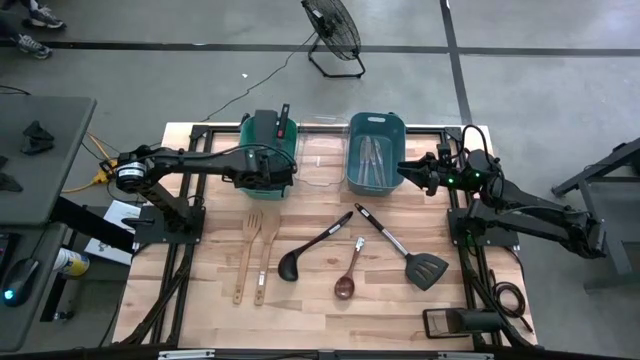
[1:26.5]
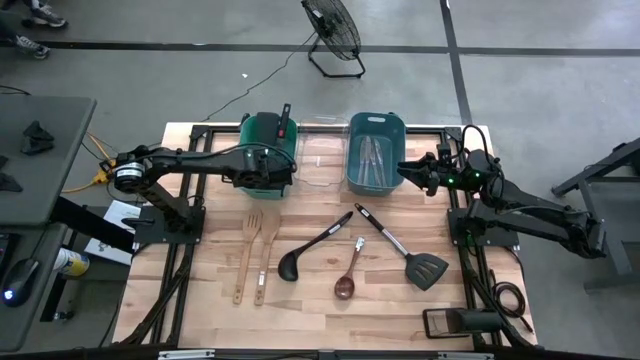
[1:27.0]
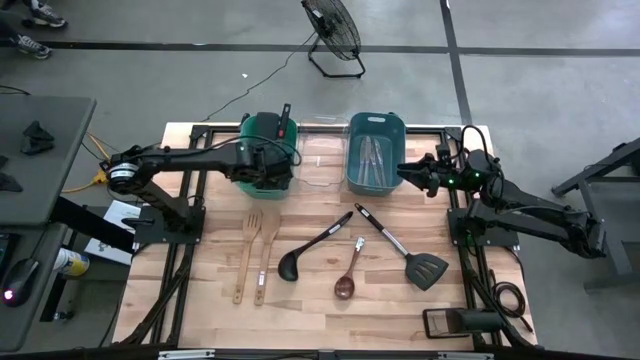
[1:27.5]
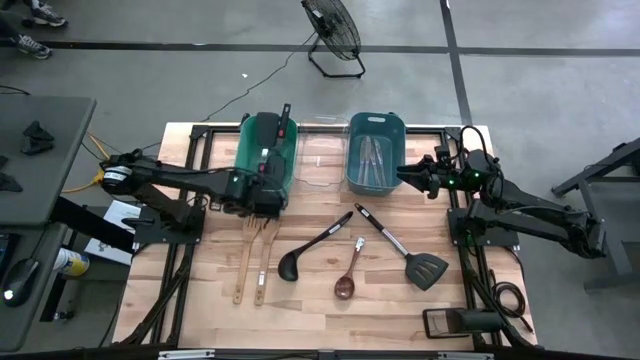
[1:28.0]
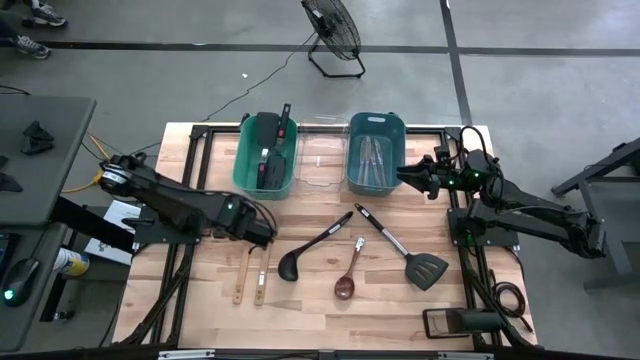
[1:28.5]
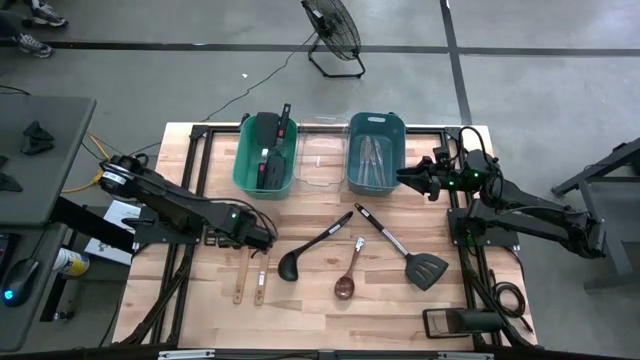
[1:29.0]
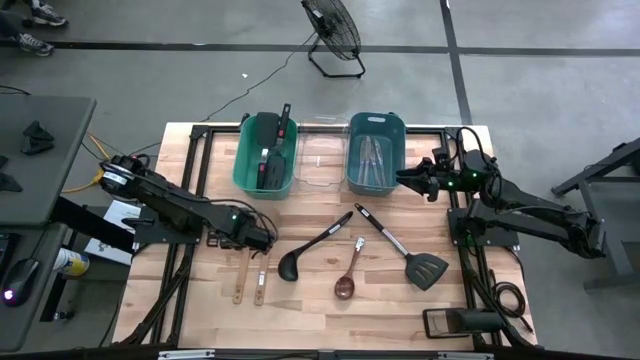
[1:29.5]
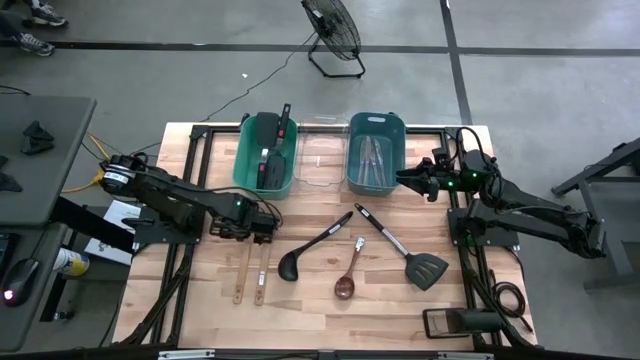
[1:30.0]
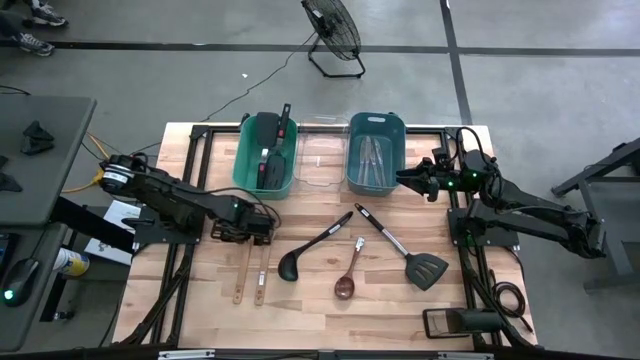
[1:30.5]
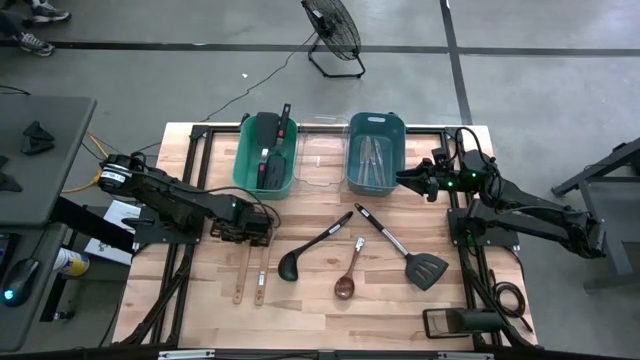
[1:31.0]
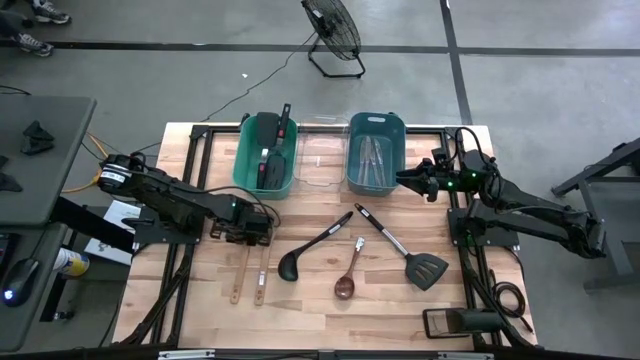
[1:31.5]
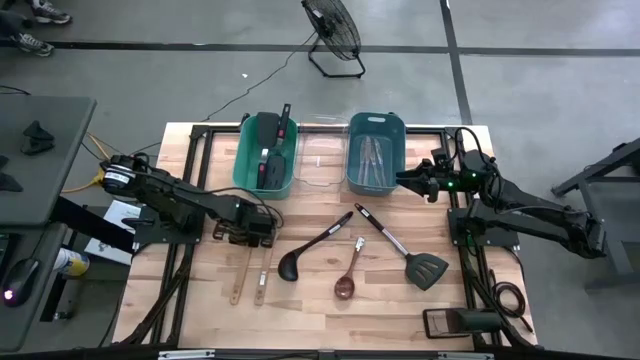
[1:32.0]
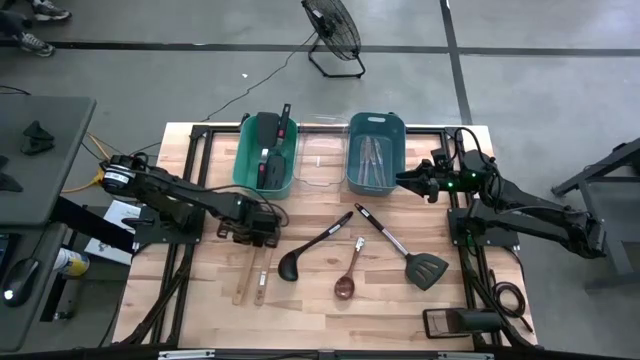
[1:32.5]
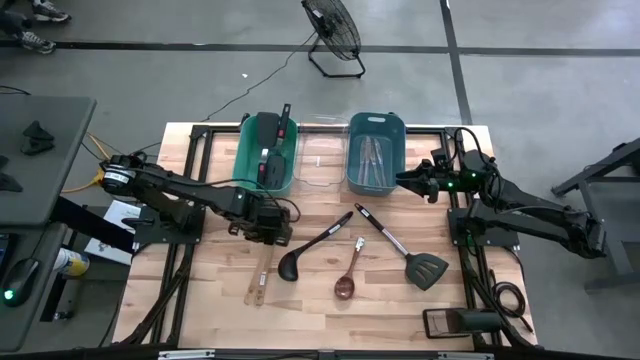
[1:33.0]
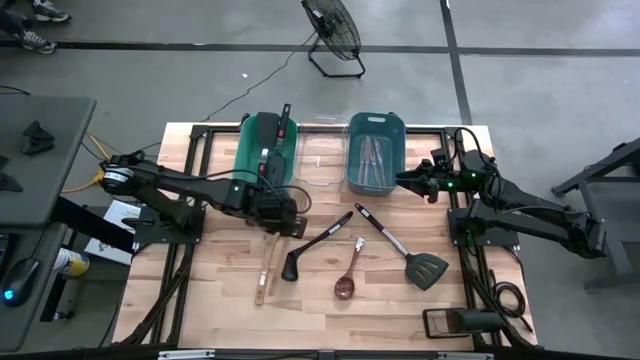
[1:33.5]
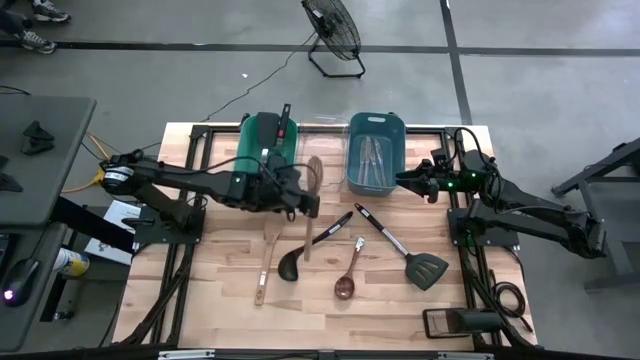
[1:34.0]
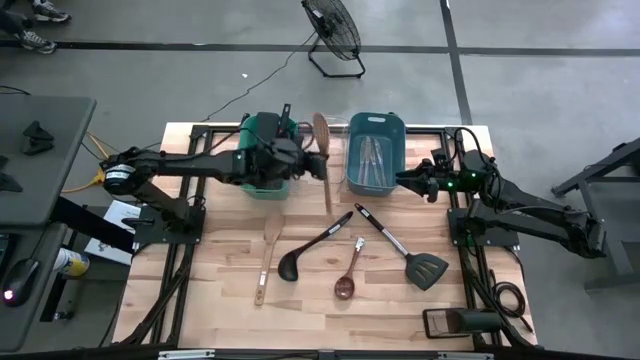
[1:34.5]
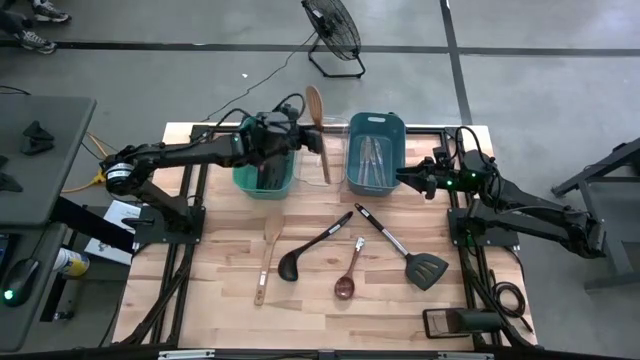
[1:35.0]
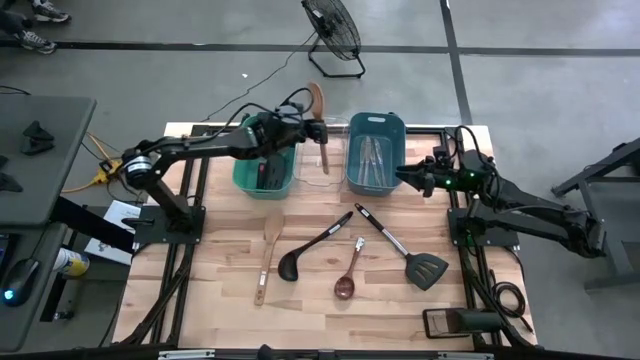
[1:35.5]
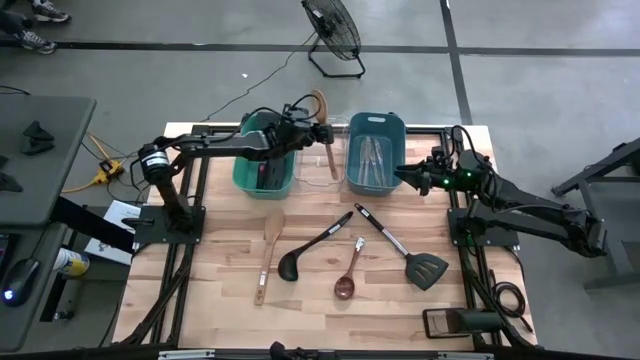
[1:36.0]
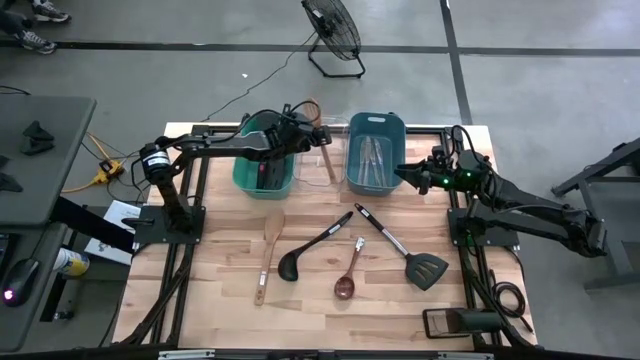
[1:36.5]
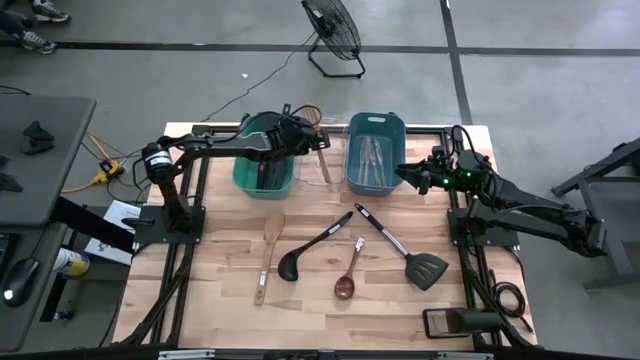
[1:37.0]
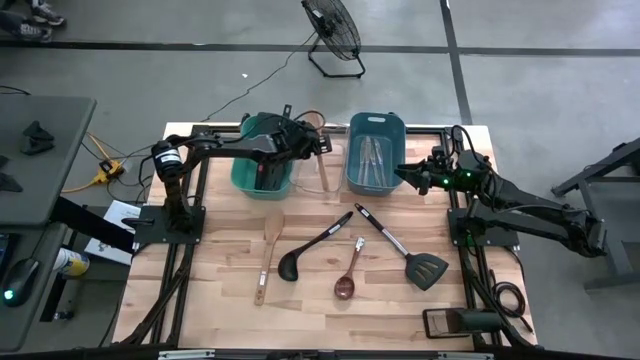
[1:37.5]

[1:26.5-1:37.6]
Task: Pick & Place Kitchen Items
Put the light brown slotted serving spoon into the transparent bin

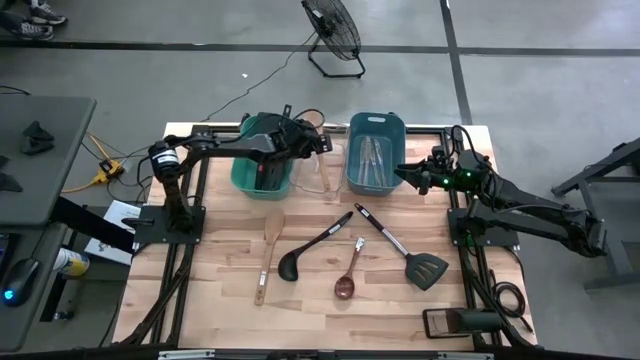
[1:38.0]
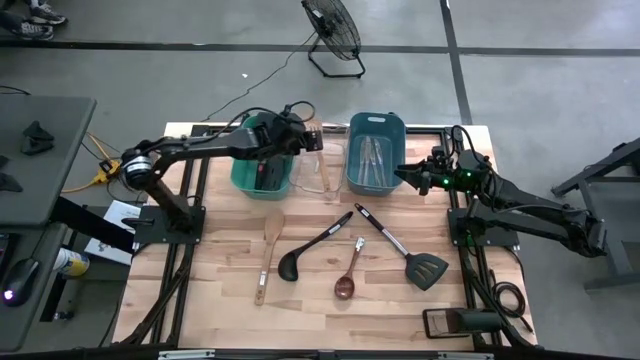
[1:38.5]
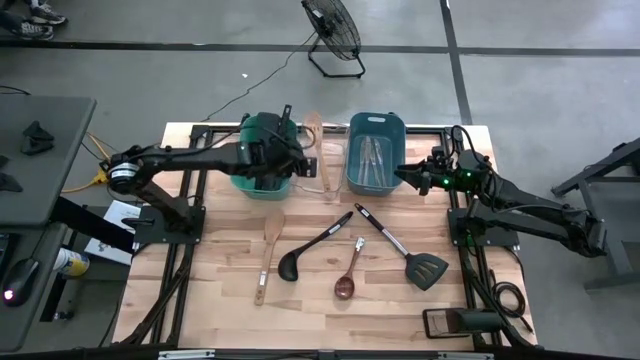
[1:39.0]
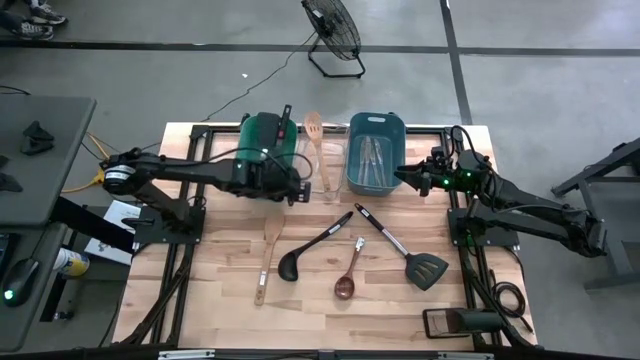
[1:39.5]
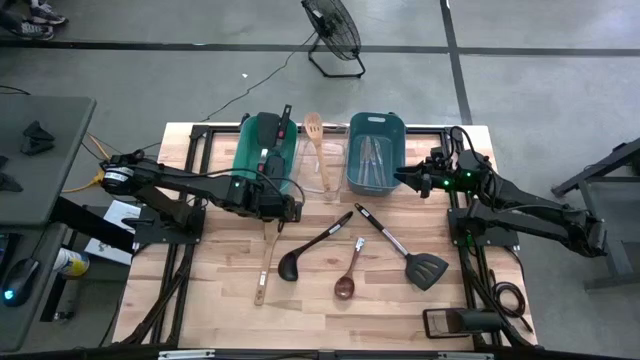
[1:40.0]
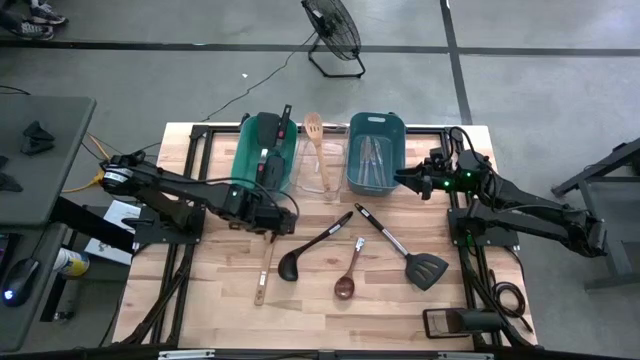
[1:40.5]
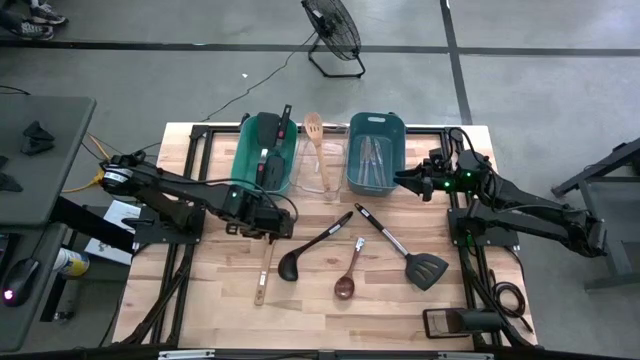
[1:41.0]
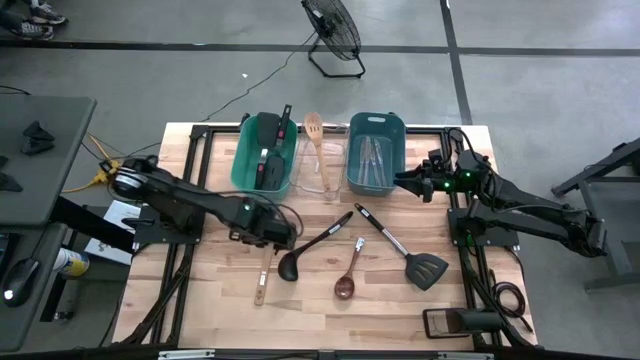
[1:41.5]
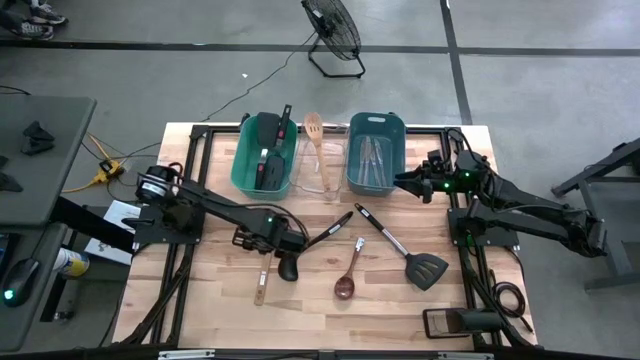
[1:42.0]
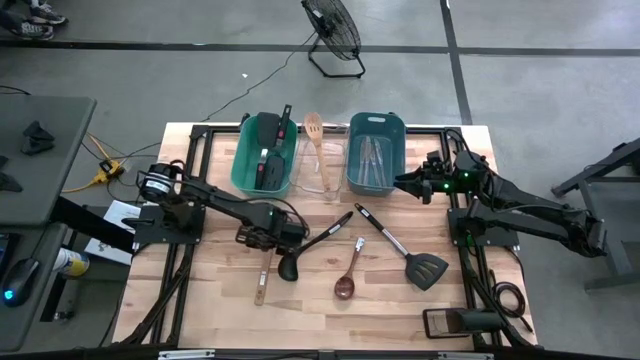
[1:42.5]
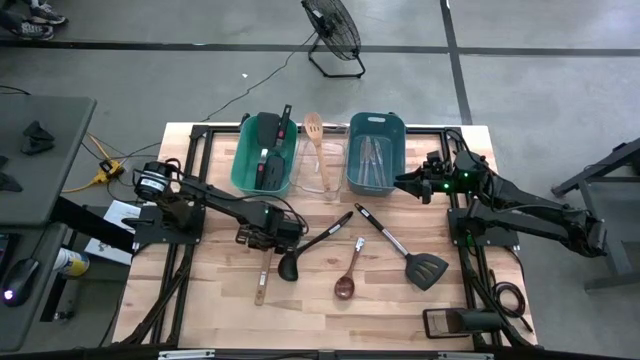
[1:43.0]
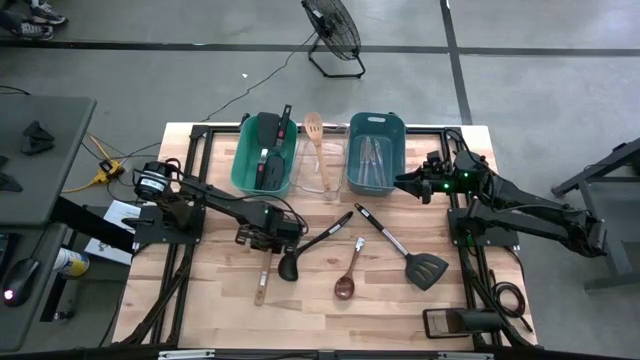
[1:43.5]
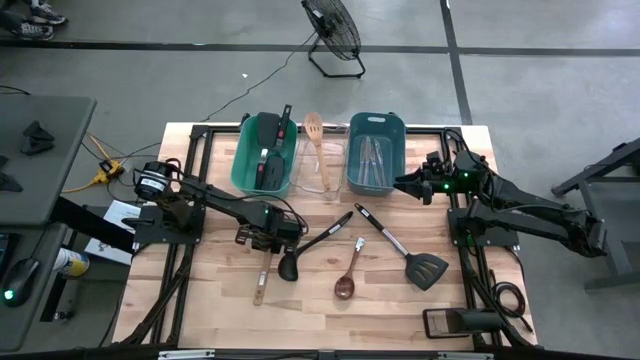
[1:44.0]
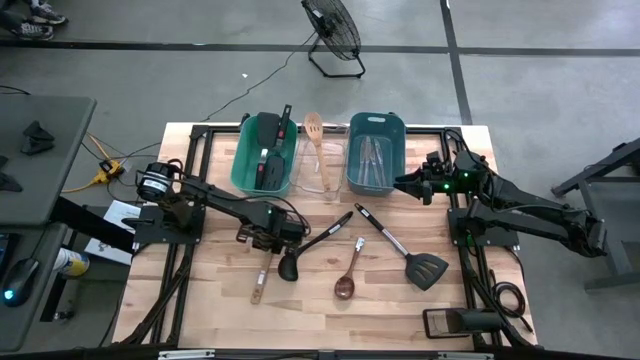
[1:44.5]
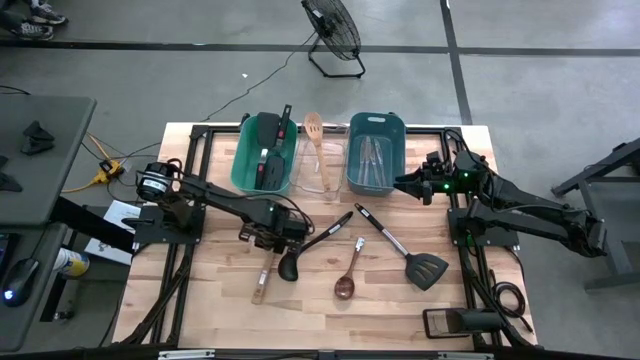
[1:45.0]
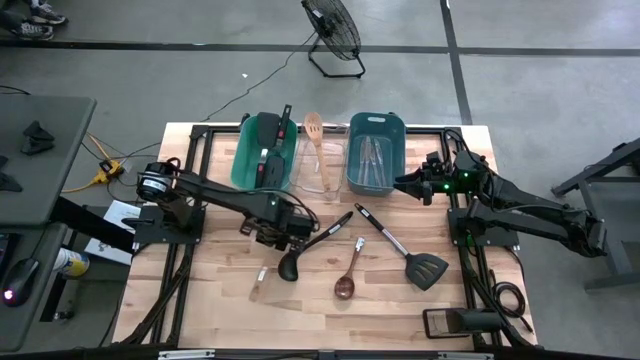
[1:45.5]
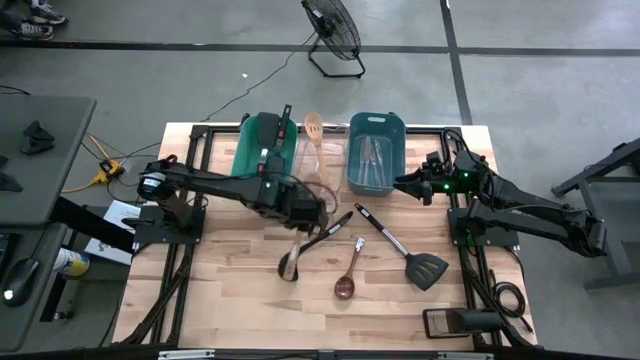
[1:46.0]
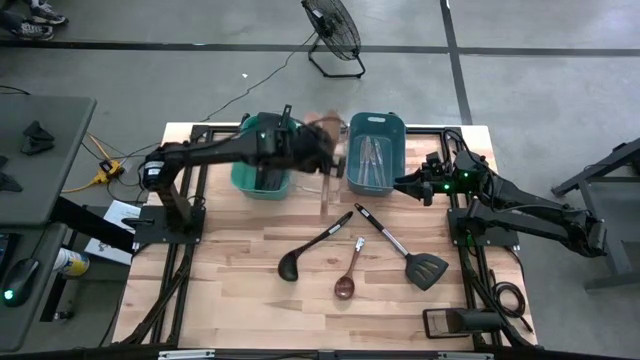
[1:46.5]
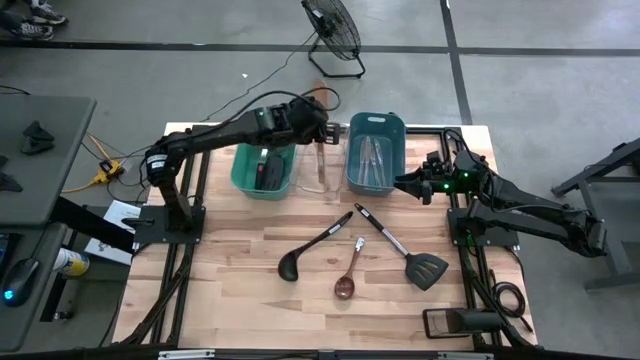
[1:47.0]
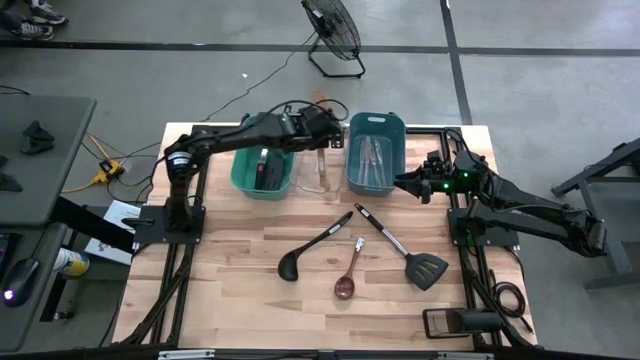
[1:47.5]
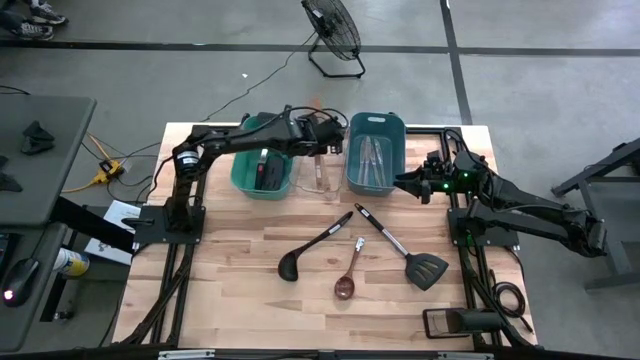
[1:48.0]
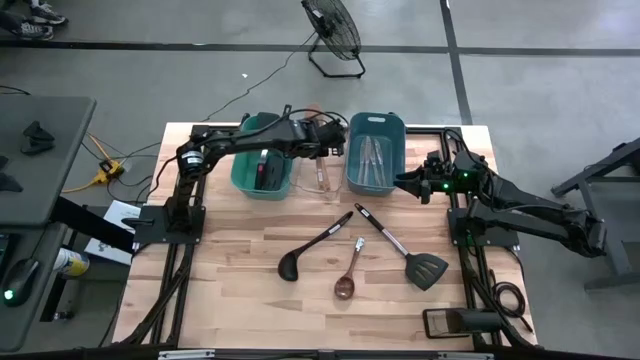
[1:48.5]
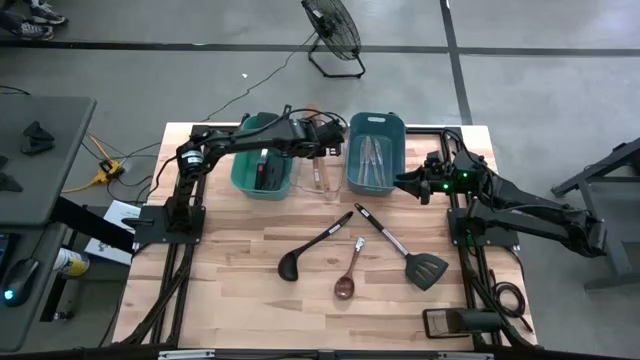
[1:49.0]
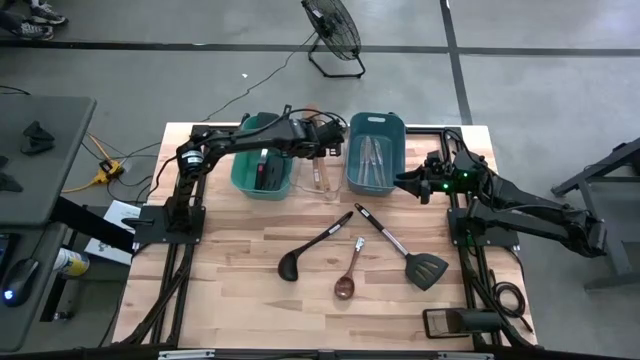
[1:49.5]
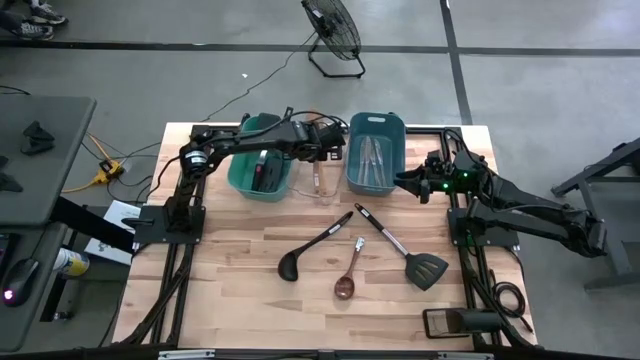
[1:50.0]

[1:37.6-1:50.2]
Put the light brown serving spoon into the transparent bin
